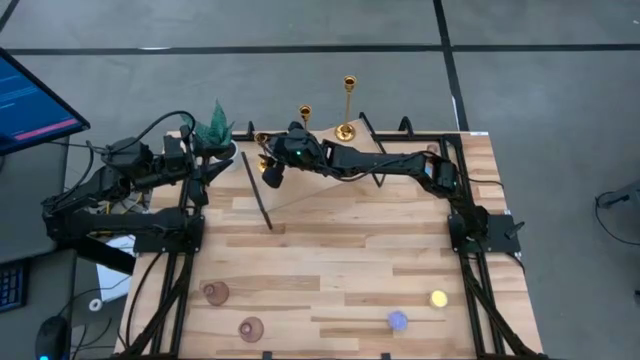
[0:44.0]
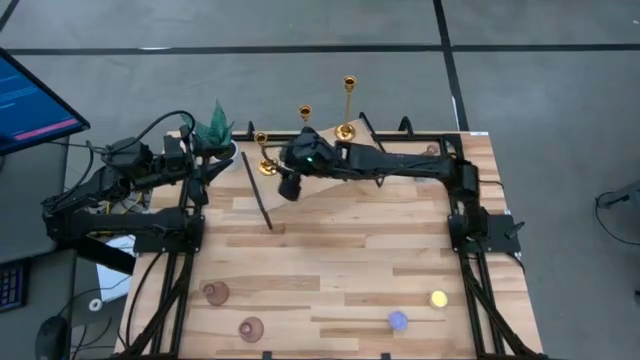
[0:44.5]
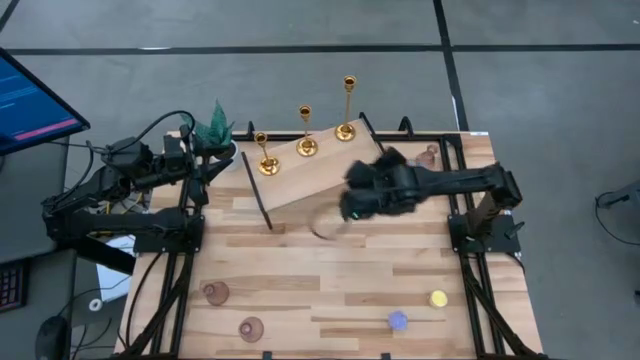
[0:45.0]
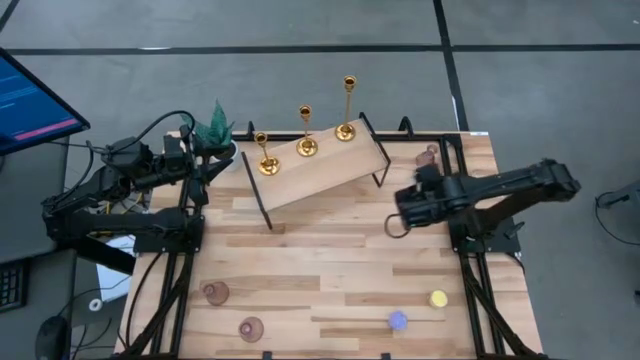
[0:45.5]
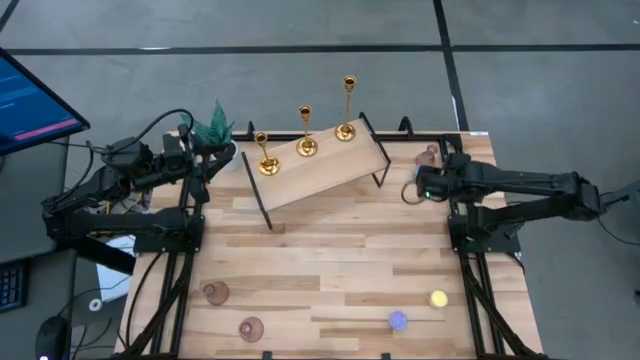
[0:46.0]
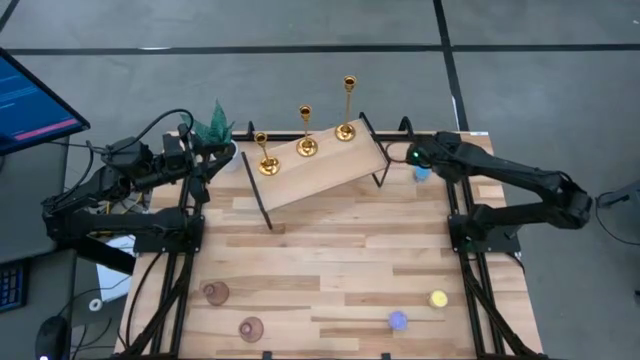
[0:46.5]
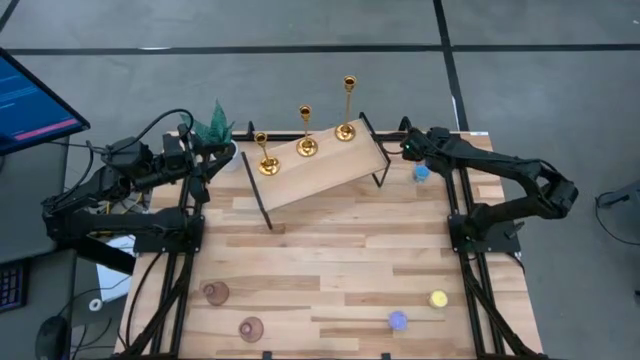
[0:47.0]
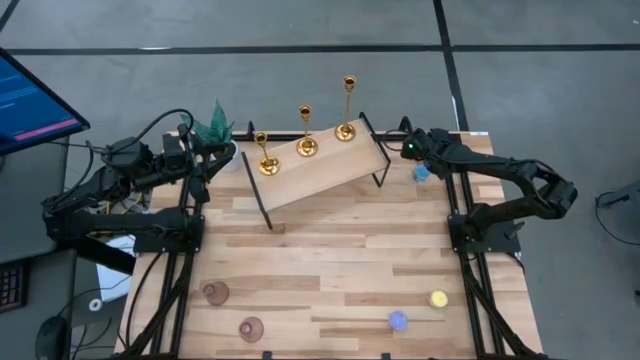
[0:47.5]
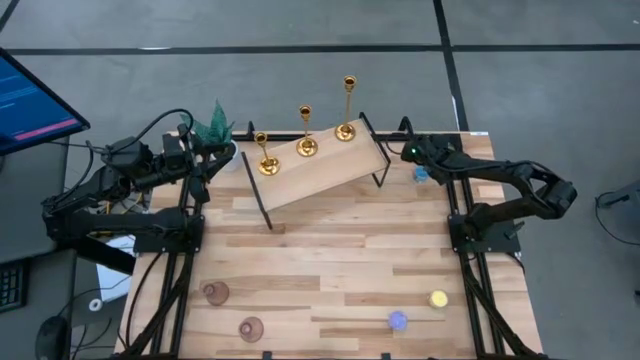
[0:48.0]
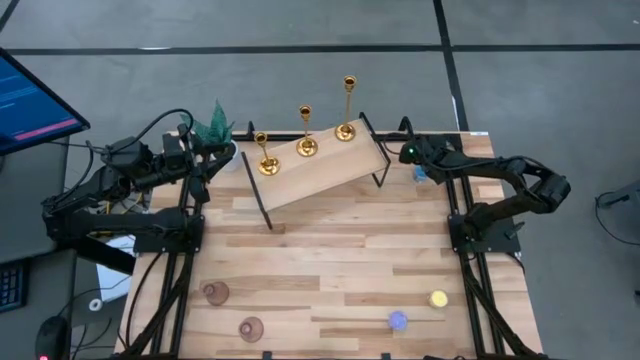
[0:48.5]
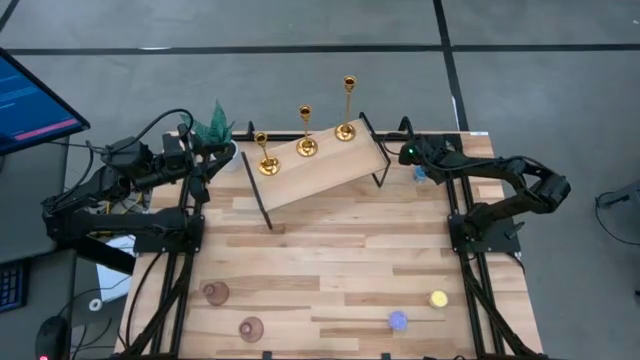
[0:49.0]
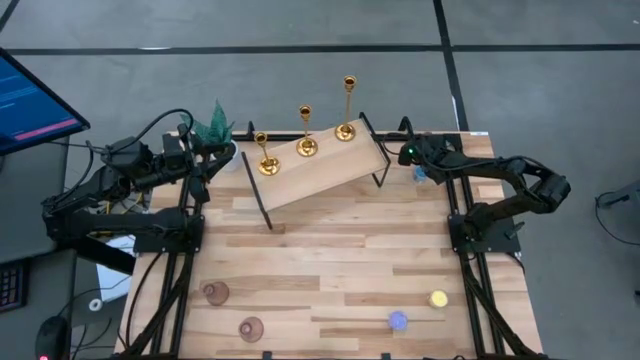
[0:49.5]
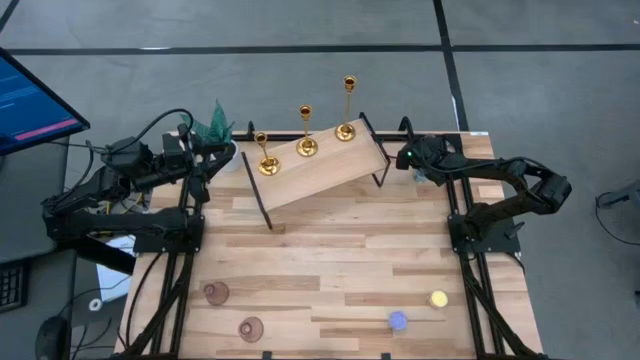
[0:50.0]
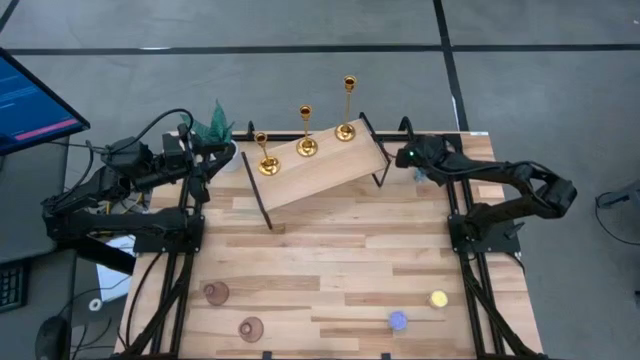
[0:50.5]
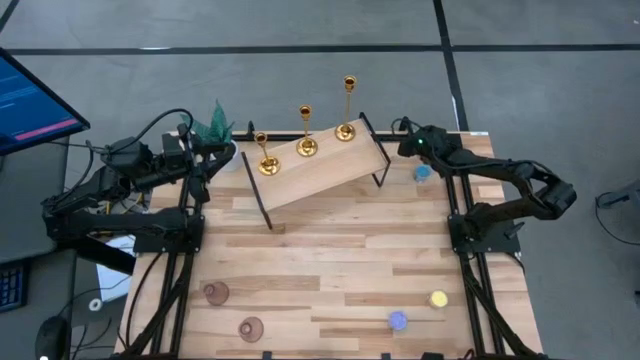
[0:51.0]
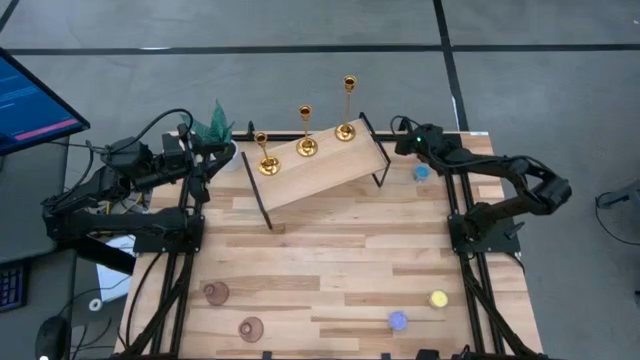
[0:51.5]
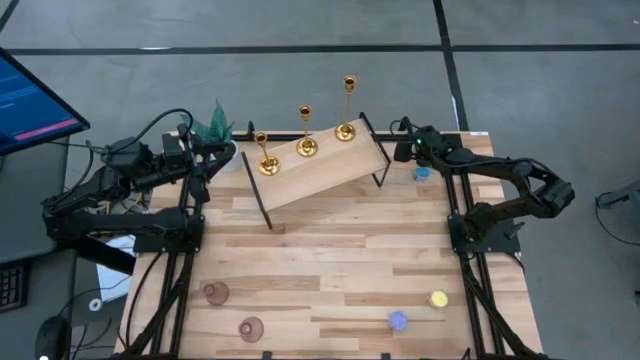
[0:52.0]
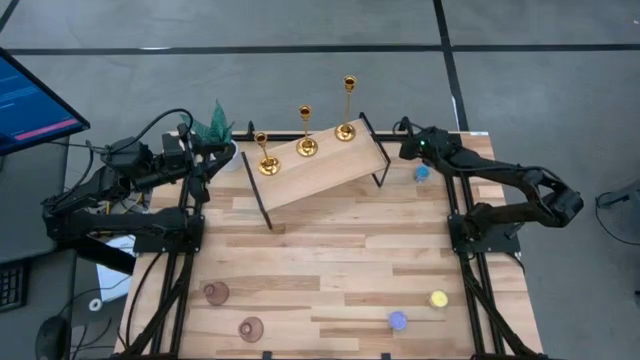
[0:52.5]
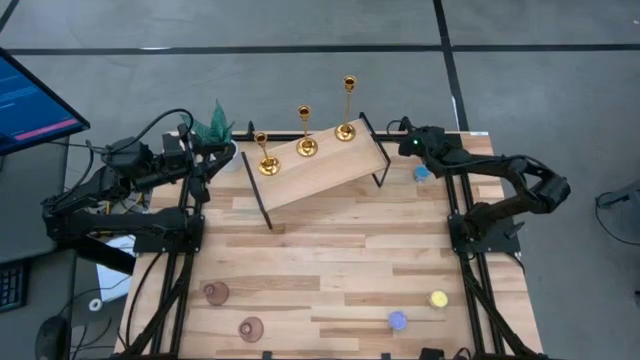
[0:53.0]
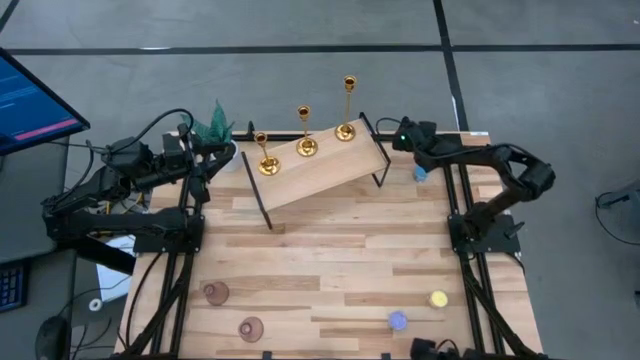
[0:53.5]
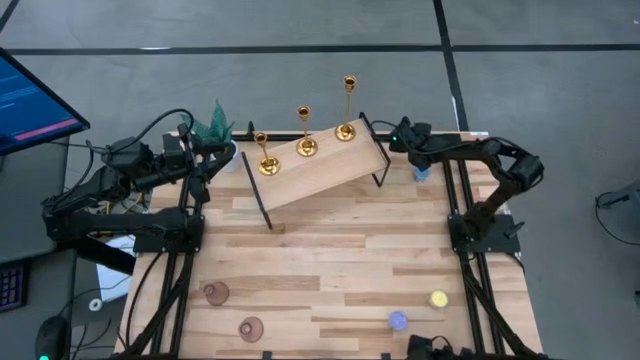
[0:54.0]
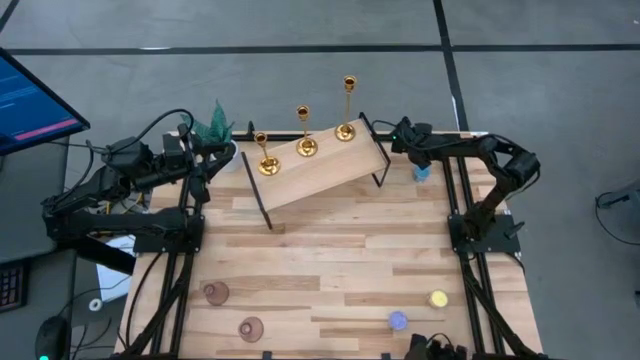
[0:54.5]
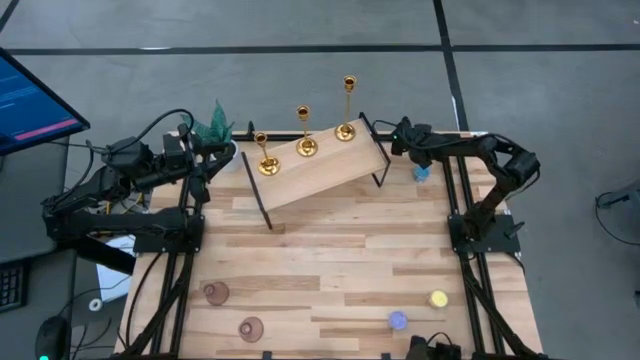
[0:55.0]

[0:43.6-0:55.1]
Task: Pick & Place candle stick holders
Put the top pink glass candle holder on the shelf

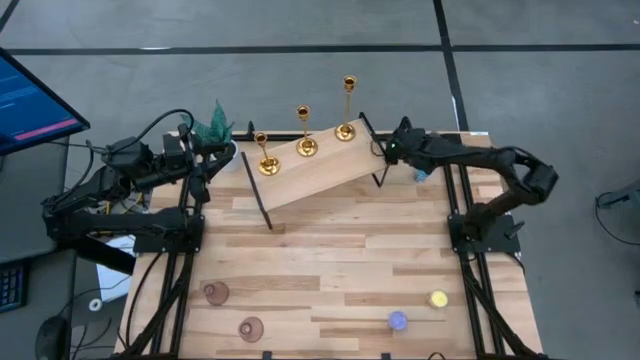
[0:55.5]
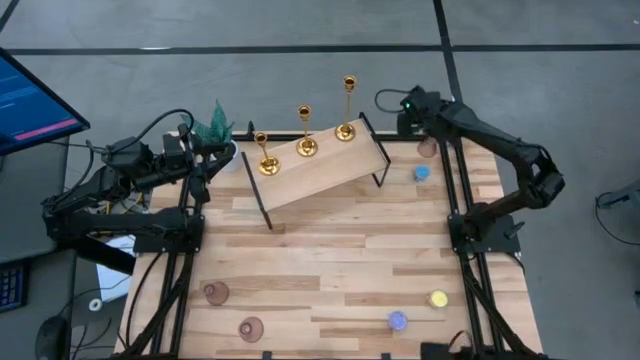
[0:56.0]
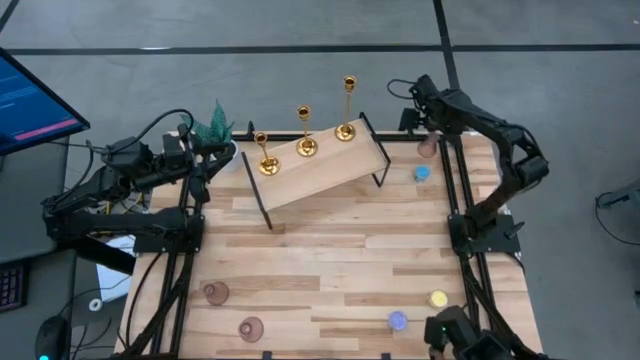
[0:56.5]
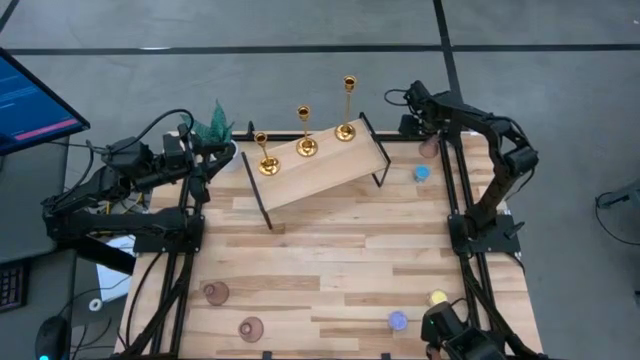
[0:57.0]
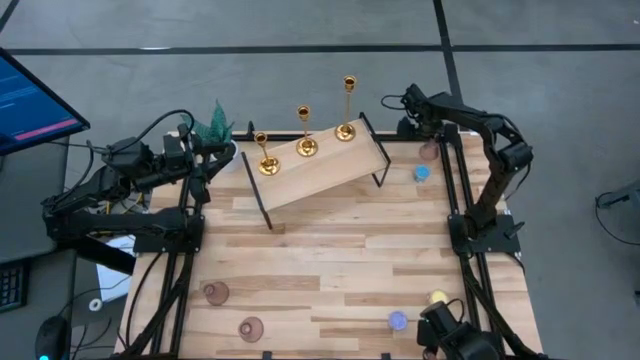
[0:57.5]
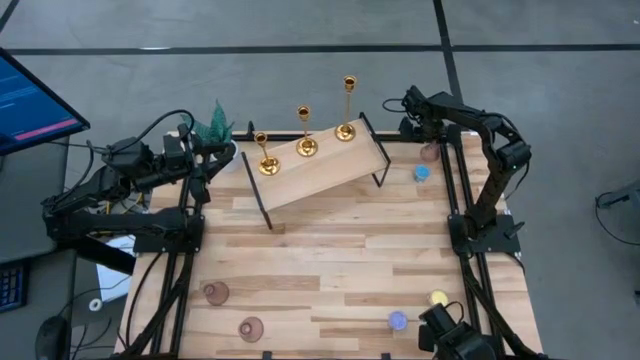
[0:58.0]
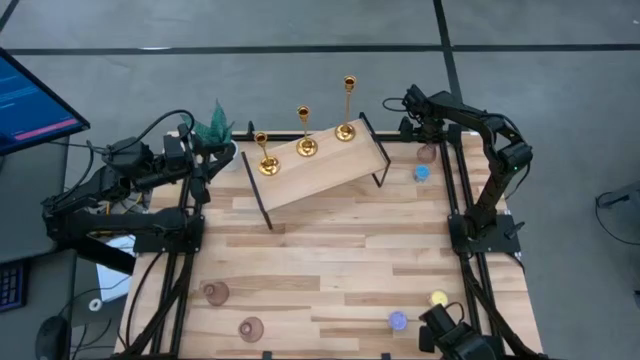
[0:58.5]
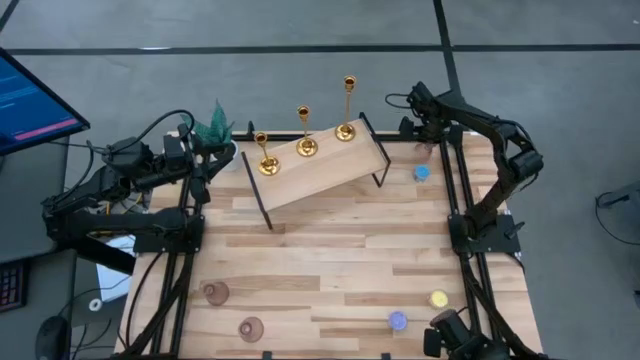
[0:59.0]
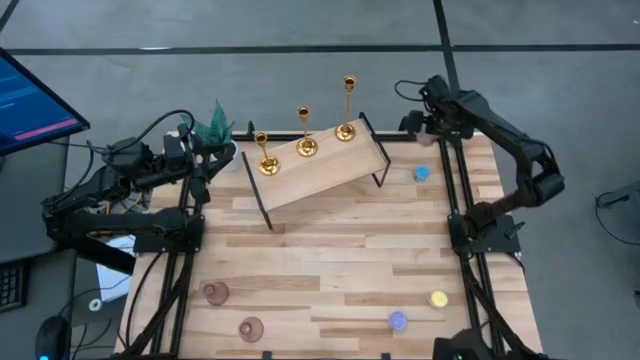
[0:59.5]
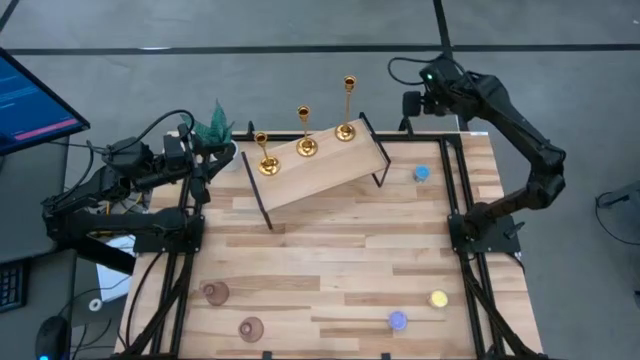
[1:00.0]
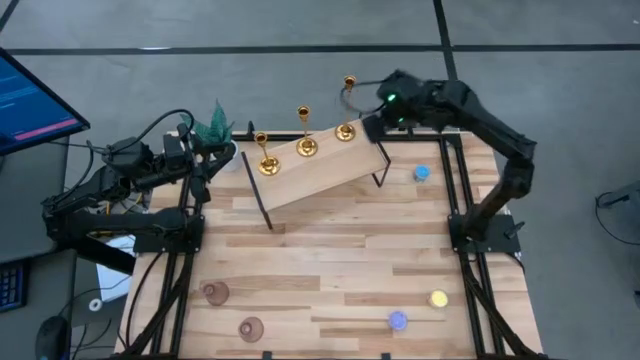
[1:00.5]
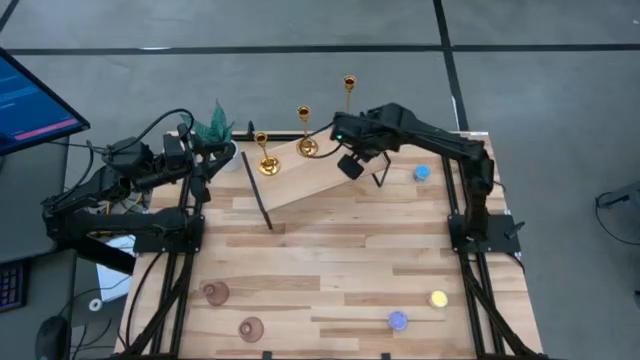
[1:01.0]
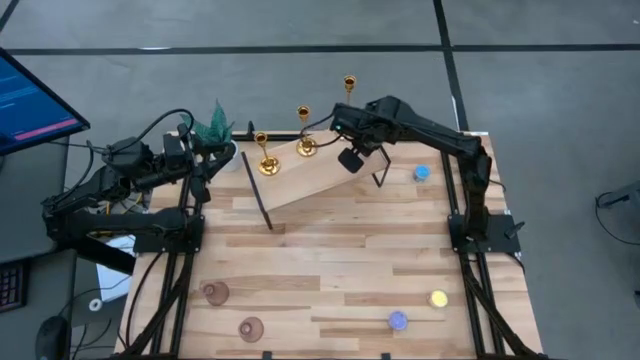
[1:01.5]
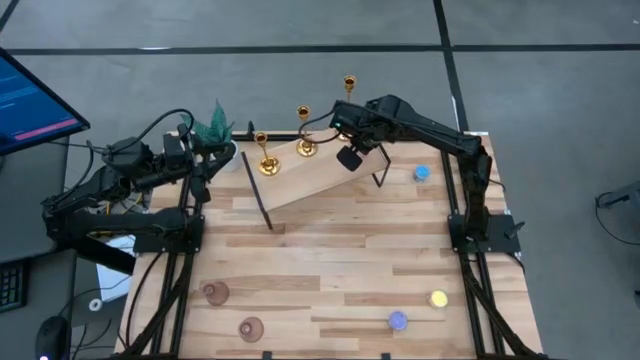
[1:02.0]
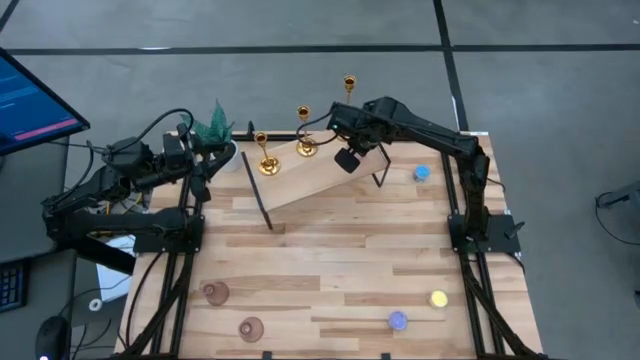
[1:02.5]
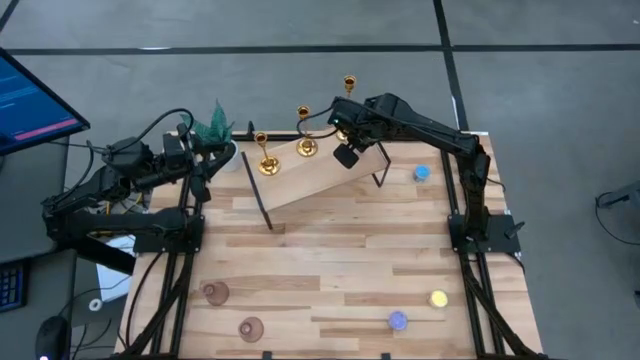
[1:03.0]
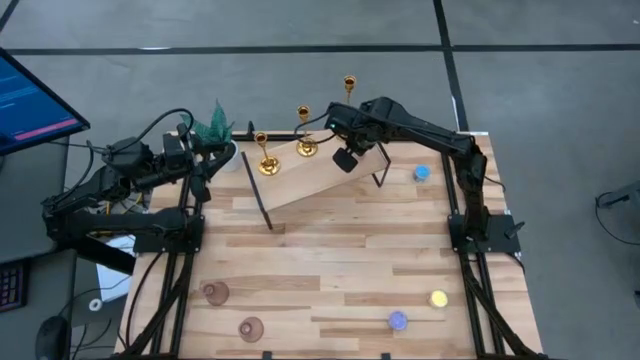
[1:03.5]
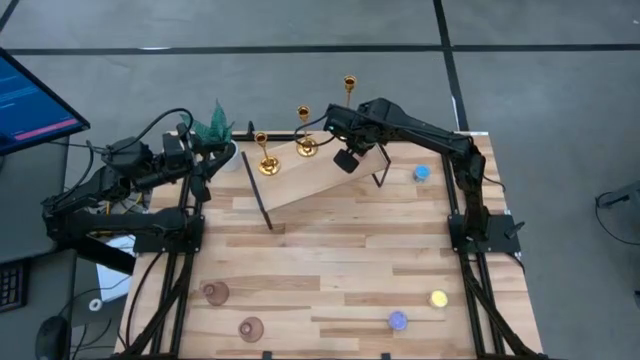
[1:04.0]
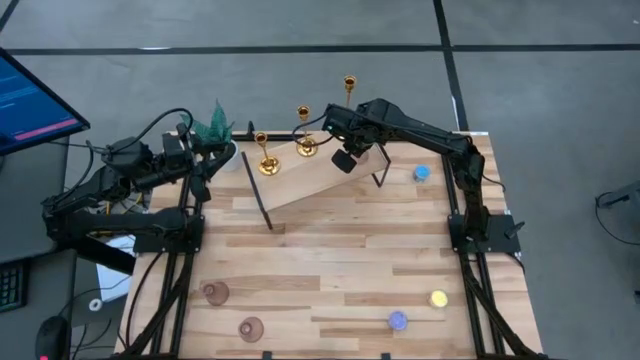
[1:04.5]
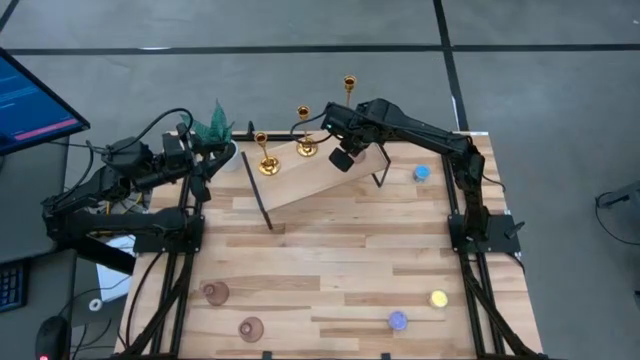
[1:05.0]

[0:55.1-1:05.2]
Put the top pink glass candle holder on the shelf
